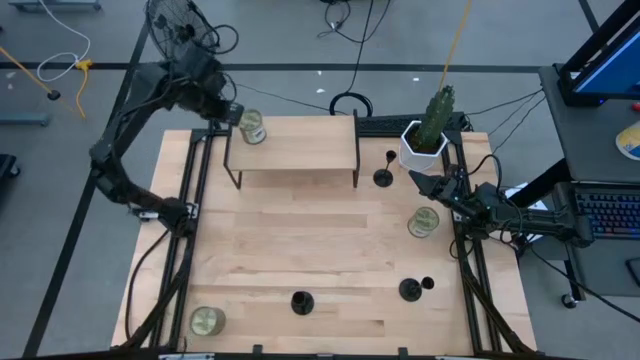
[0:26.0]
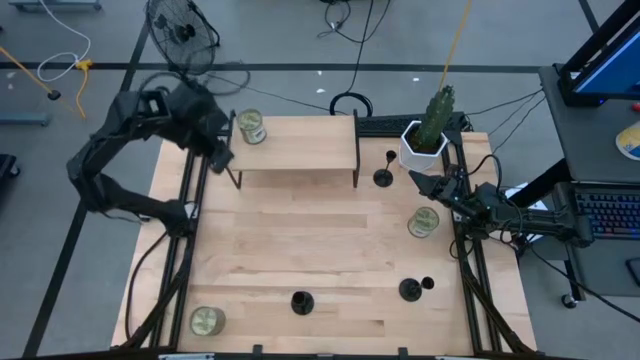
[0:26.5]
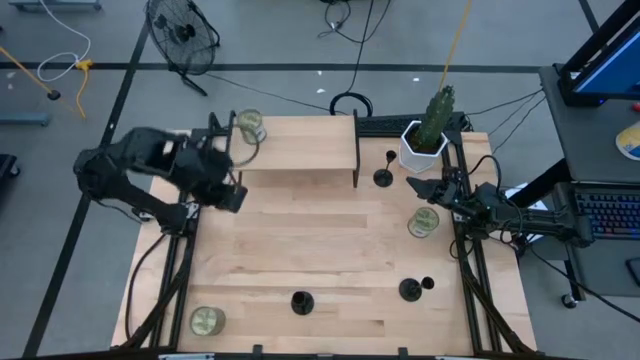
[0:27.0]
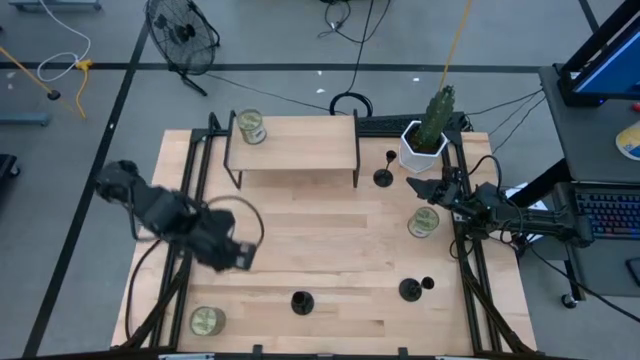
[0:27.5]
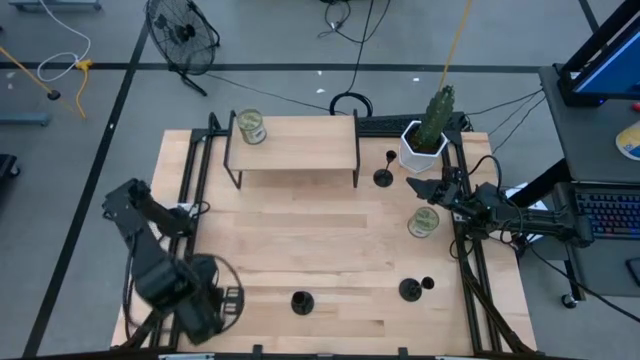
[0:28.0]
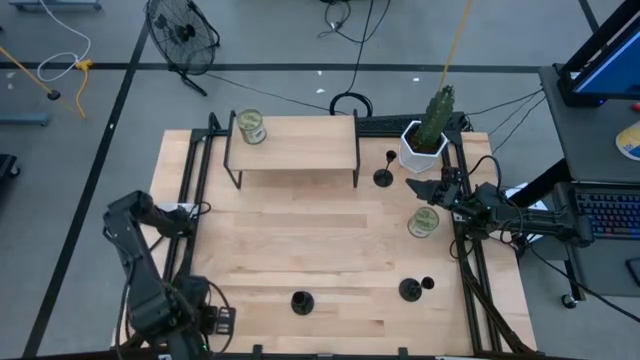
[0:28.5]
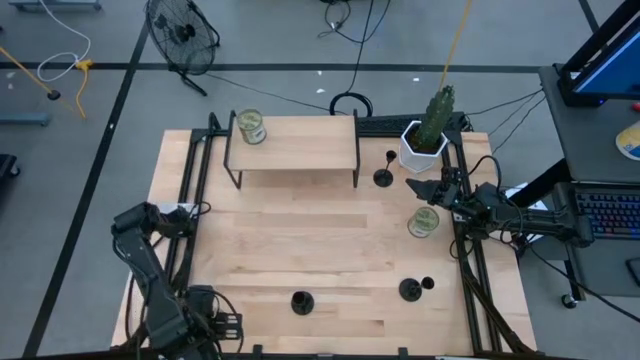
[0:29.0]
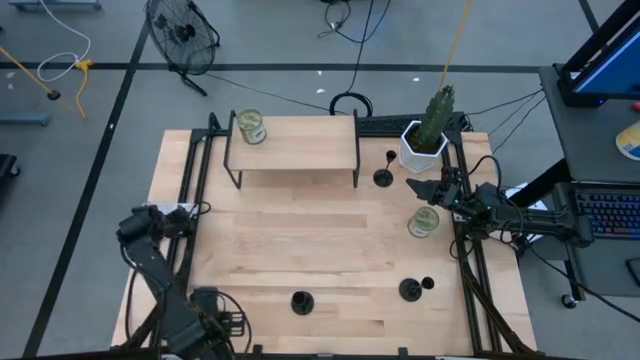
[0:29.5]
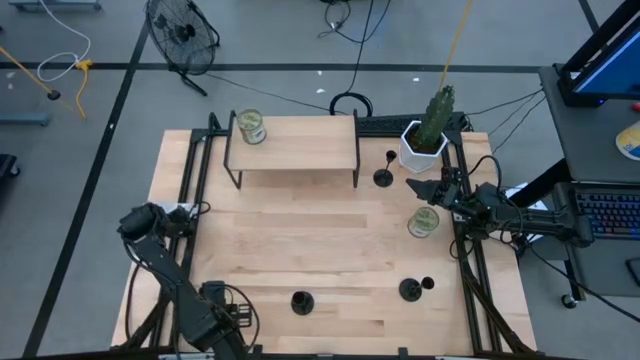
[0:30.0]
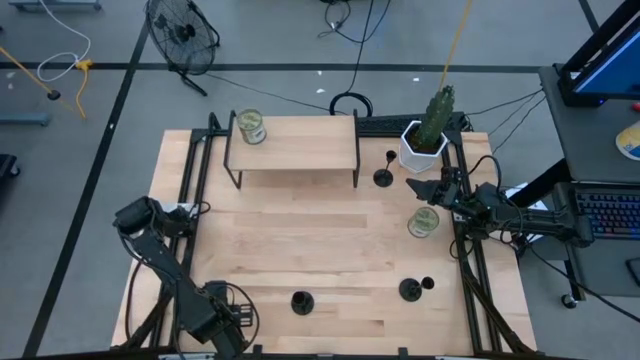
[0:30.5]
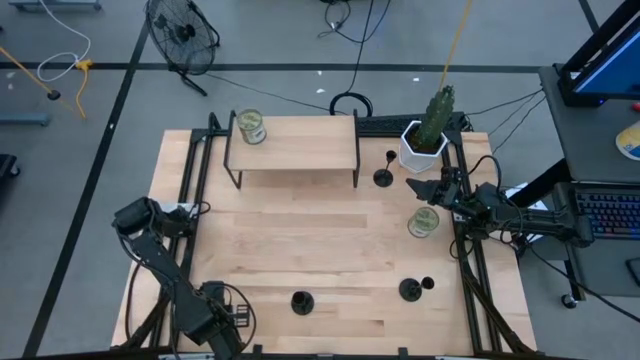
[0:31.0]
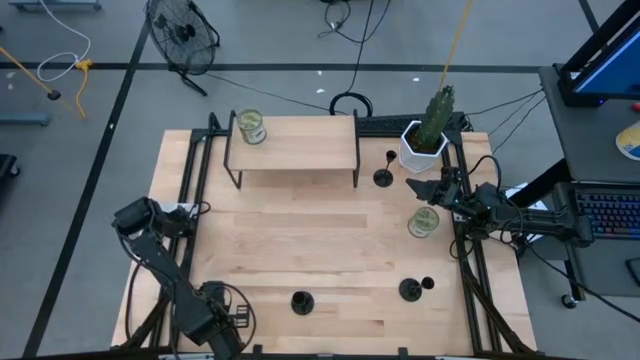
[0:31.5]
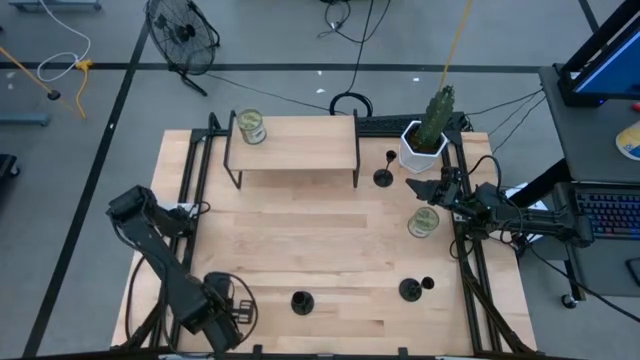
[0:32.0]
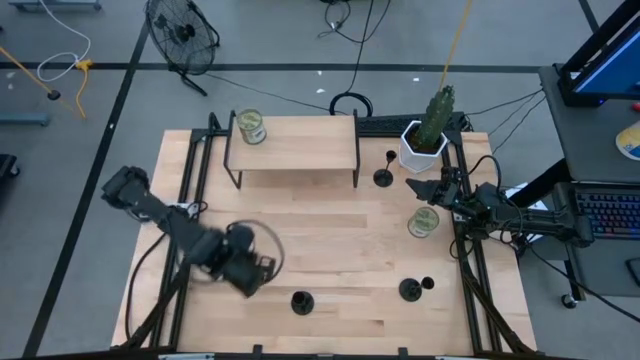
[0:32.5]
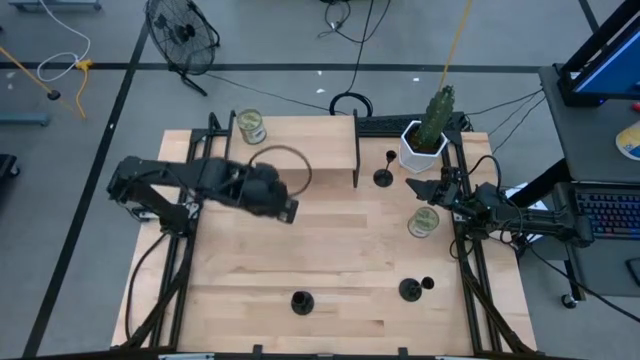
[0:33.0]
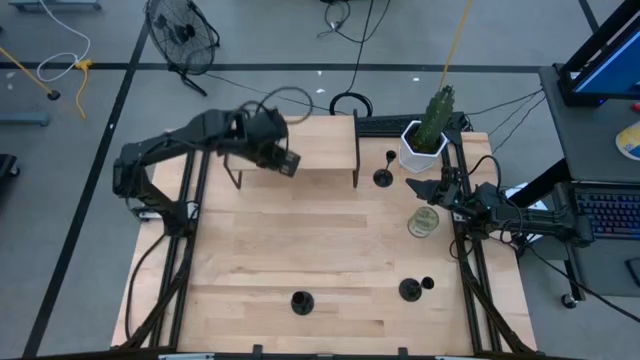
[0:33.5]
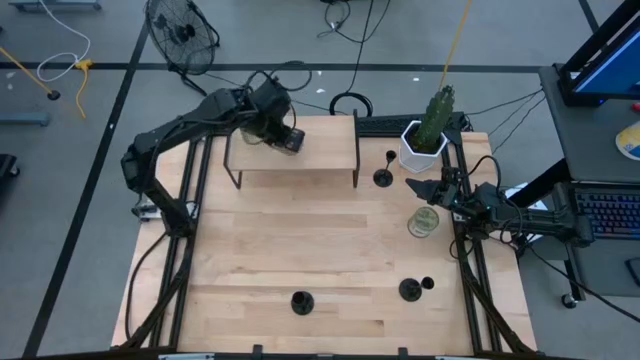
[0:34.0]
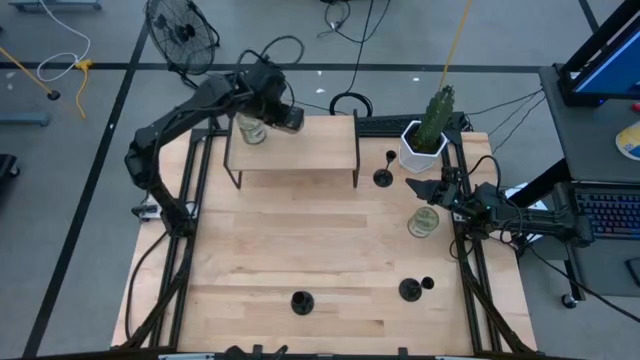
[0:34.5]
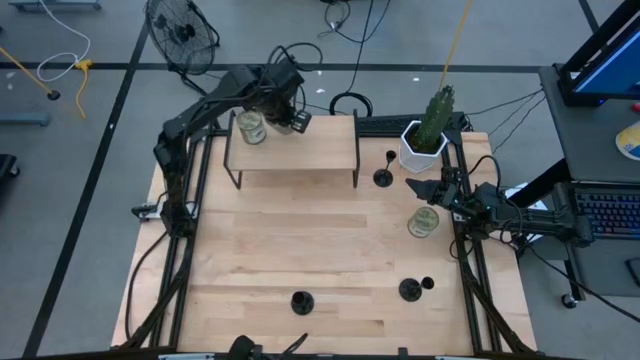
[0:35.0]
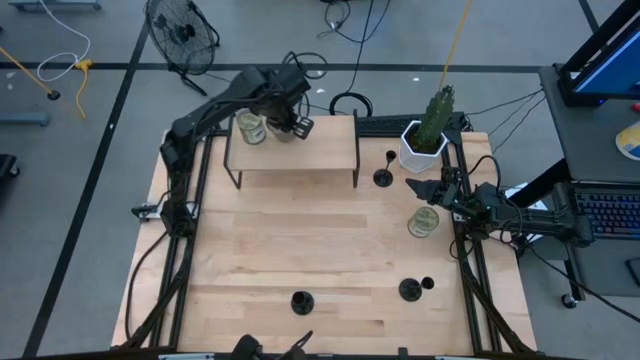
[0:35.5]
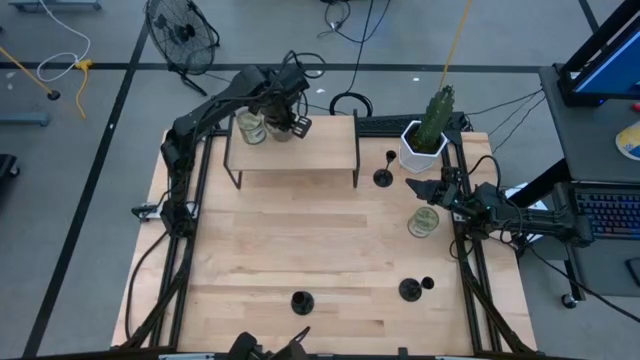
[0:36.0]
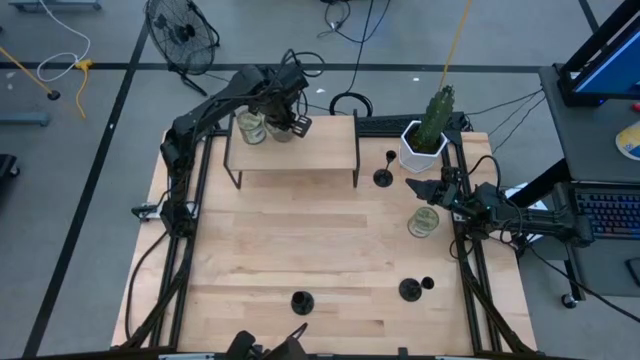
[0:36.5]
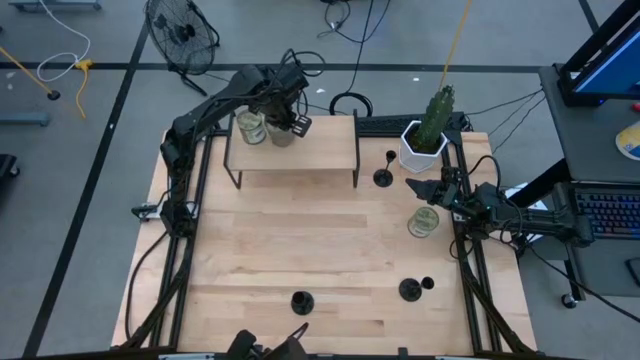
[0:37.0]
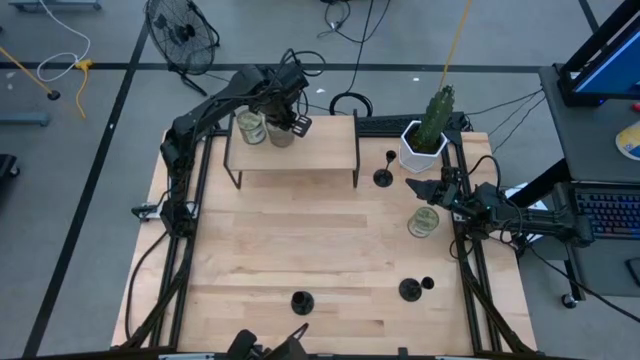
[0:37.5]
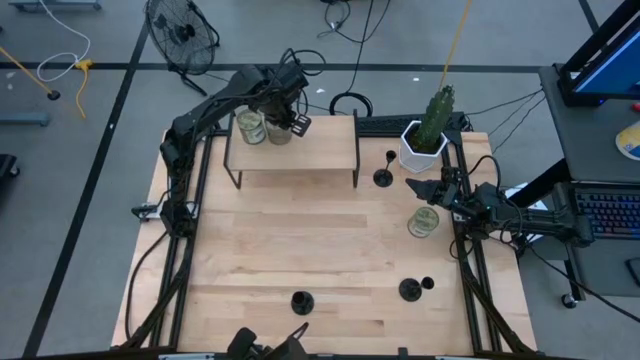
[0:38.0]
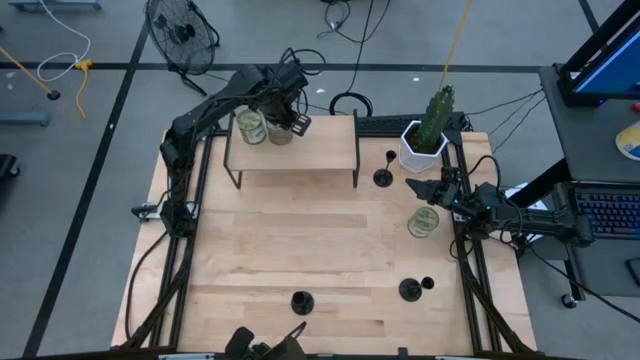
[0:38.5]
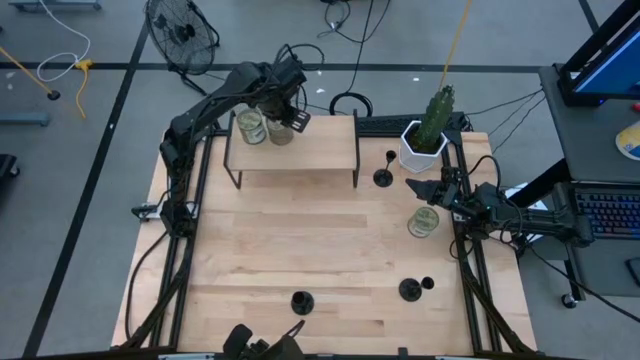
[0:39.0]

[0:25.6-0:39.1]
Task: Pick & Place candle stick holders
Put the bottom left silver scented candle on the shelf

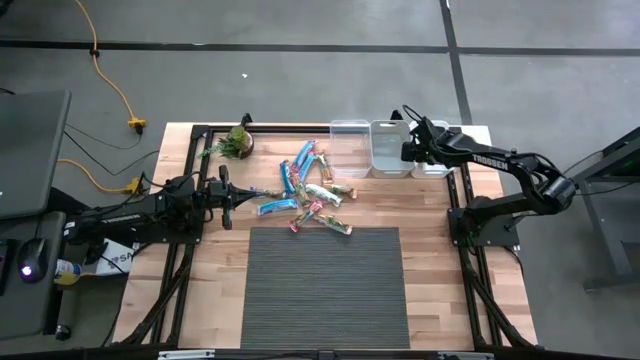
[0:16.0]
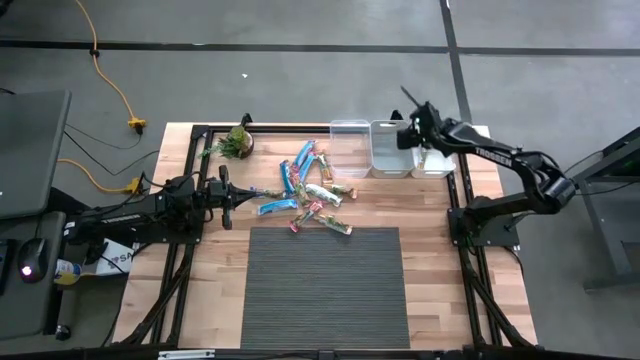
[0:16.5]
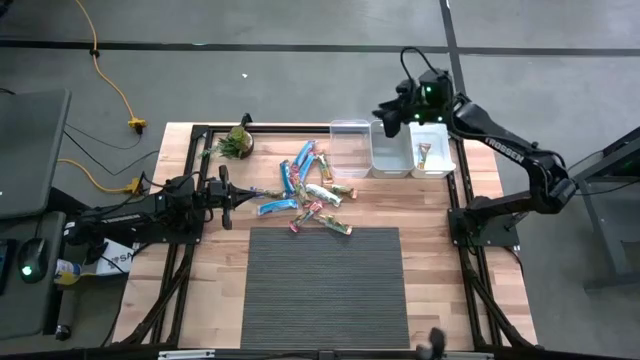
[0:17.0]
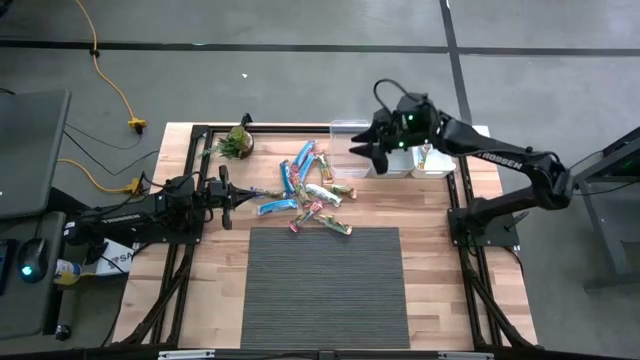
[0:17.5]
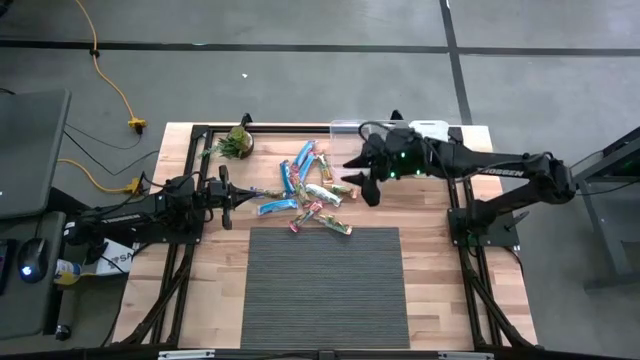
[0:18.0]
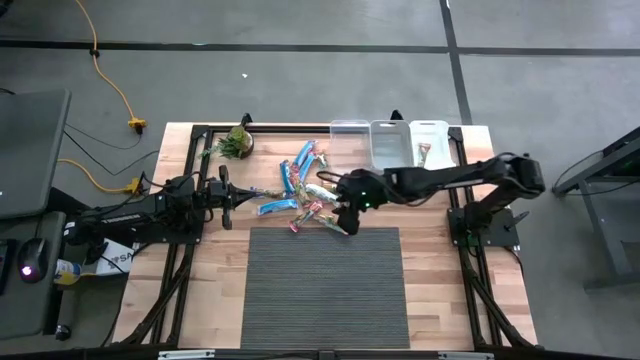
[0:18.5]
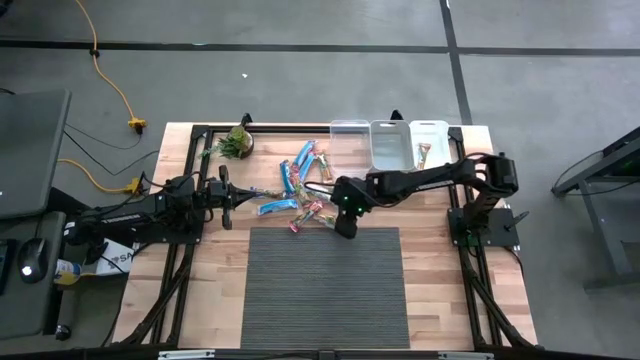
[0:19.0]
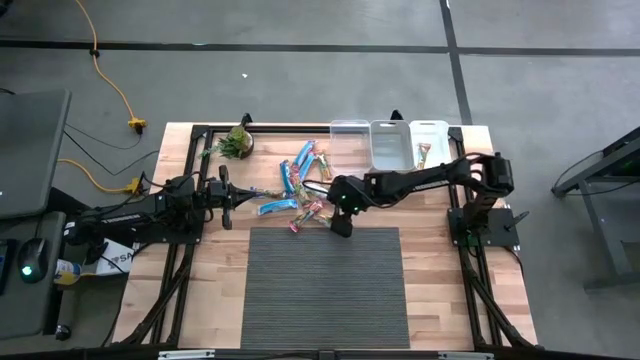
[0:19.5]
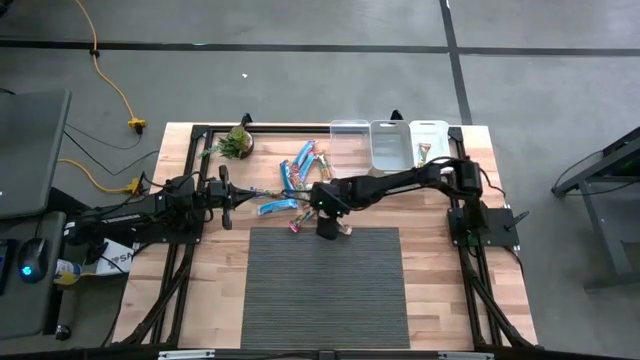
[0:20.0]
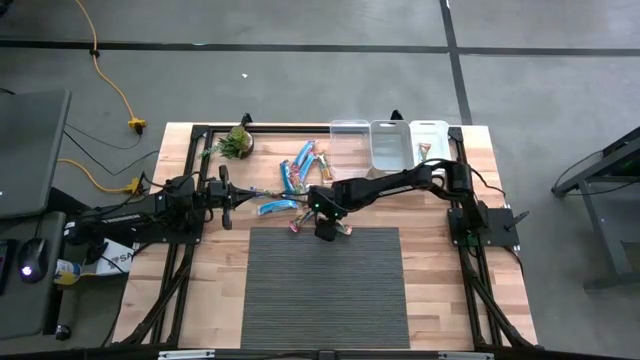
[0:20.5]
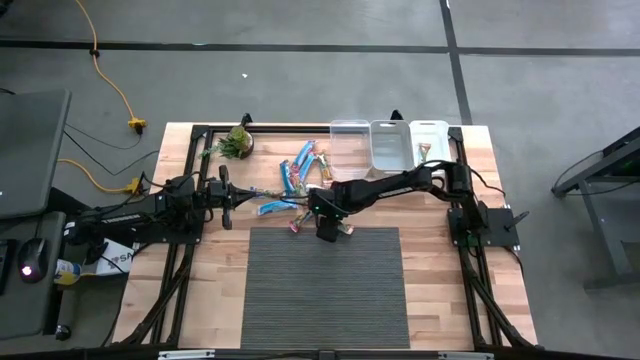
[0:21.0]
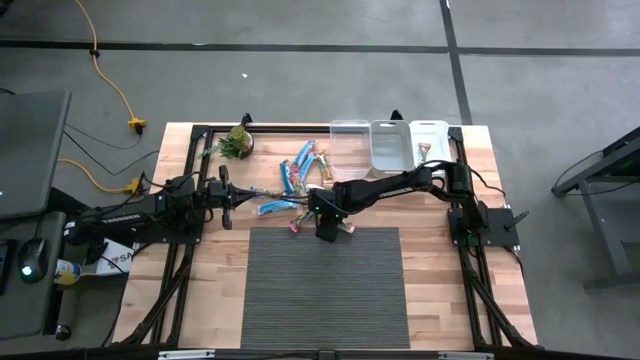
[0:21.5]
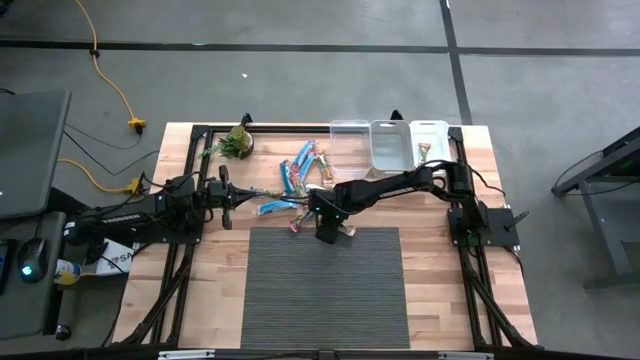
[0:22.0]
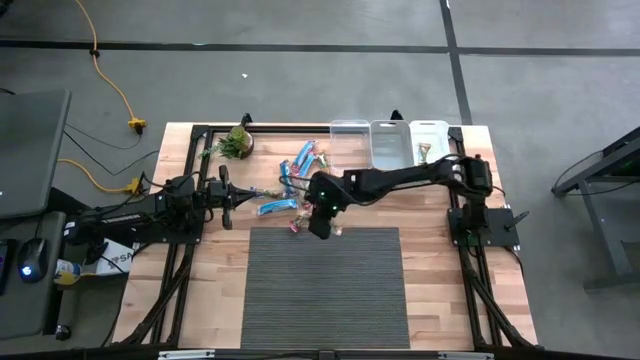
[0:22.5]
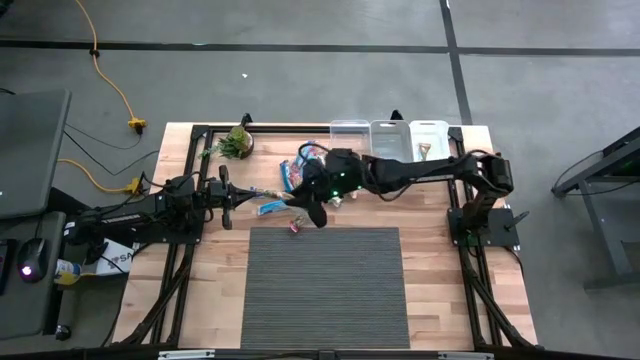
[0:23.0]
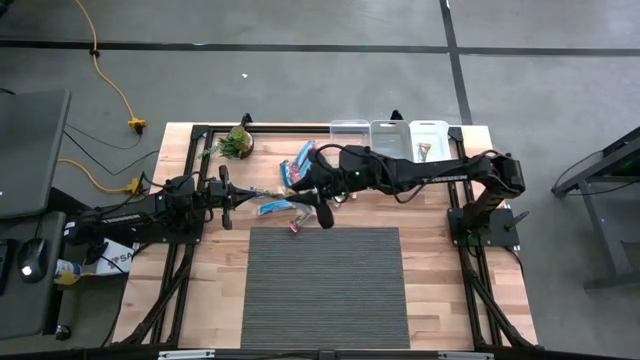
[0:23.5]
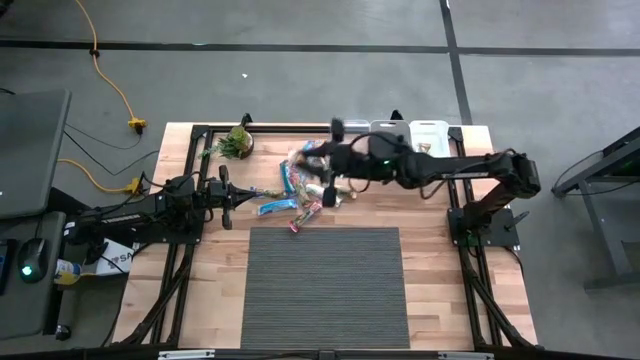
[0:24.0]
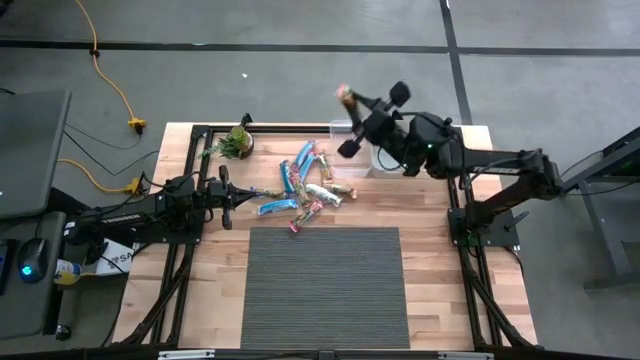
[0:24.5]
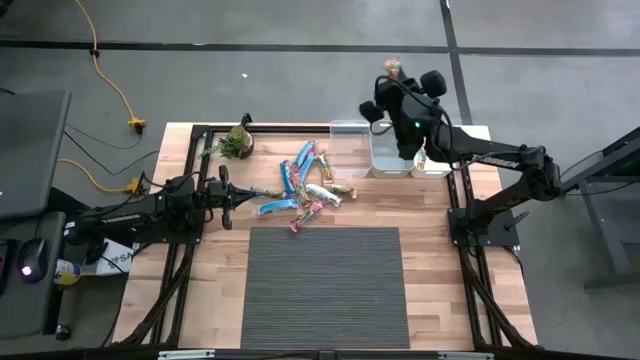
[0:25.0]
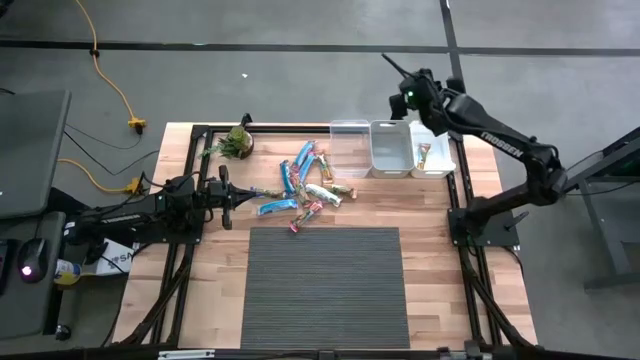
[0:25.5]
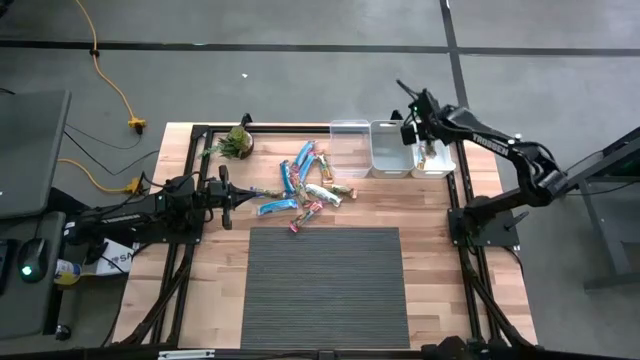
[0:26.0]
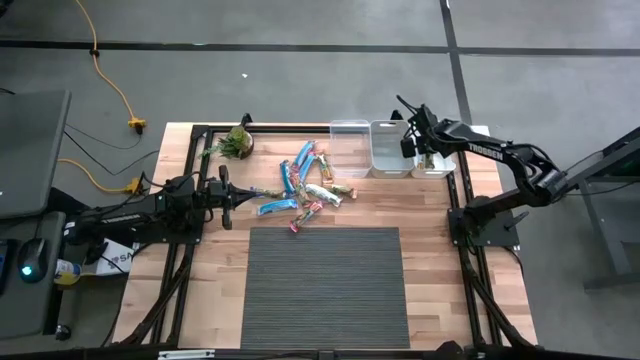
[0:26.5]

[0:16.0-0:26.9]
Task: Pick and place Granola Bars by type
Put the yellow granola bar into the white bin
